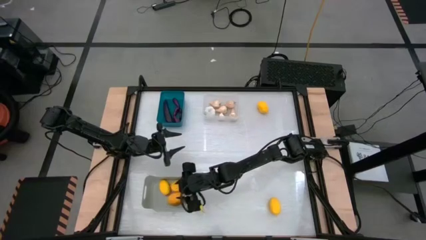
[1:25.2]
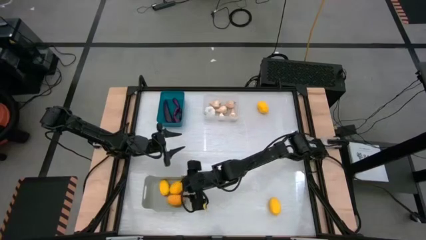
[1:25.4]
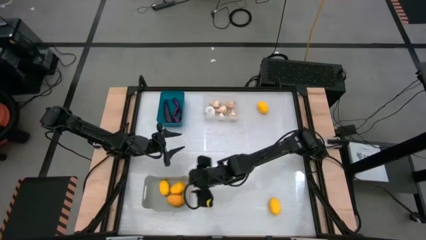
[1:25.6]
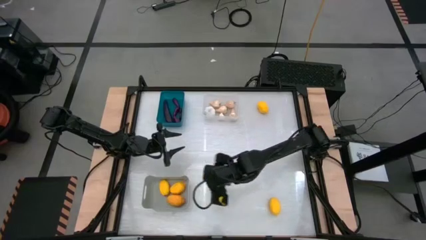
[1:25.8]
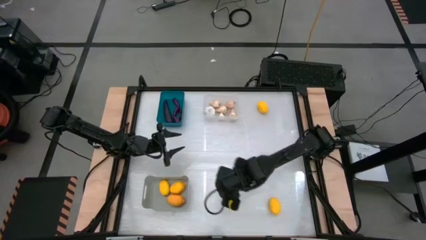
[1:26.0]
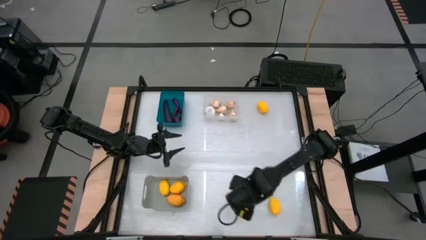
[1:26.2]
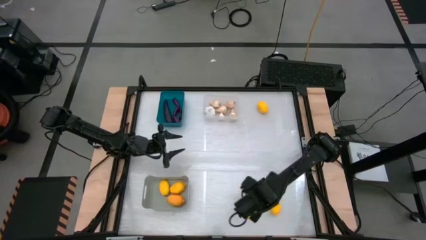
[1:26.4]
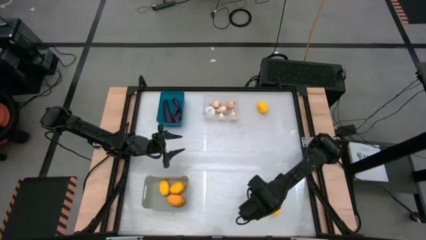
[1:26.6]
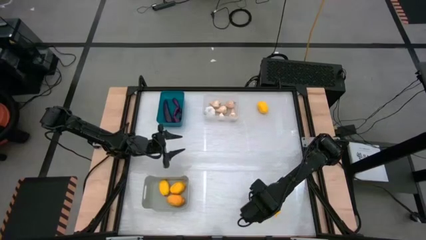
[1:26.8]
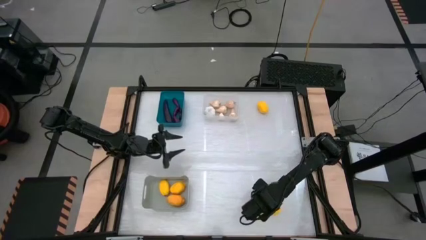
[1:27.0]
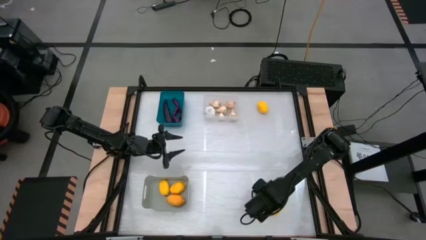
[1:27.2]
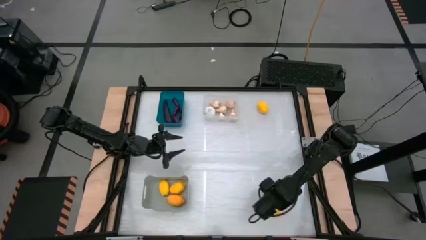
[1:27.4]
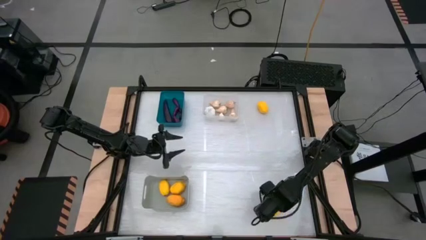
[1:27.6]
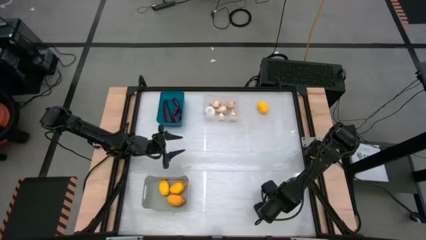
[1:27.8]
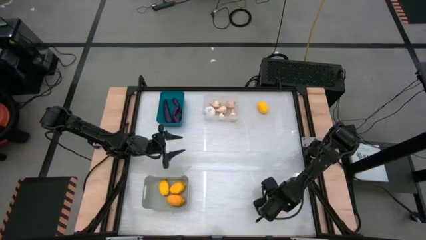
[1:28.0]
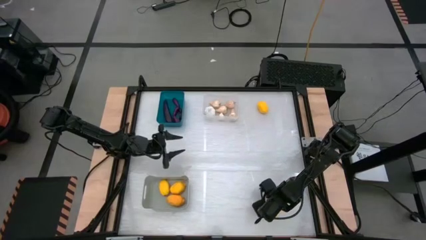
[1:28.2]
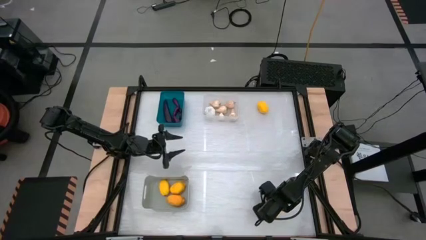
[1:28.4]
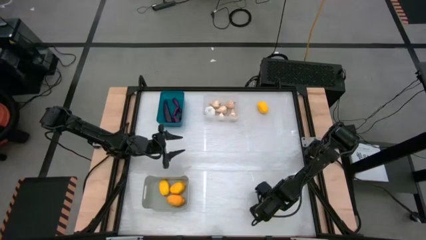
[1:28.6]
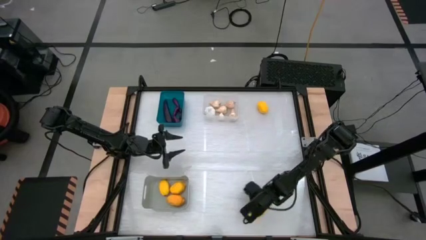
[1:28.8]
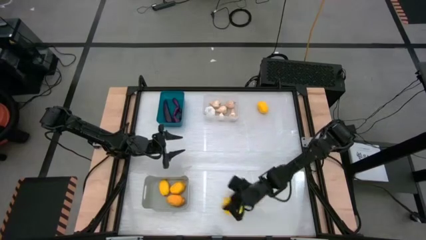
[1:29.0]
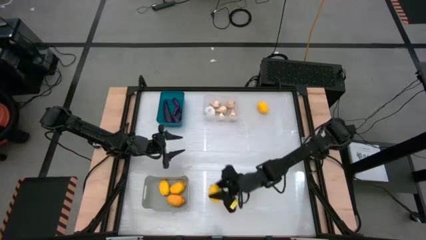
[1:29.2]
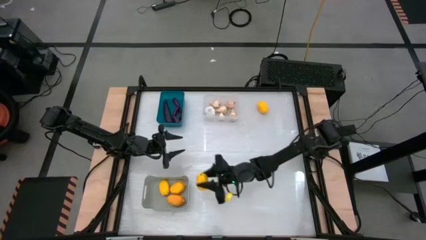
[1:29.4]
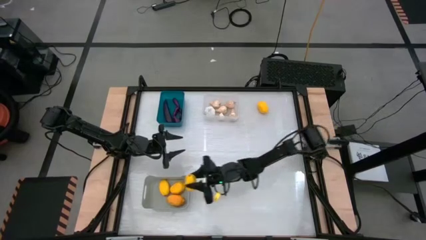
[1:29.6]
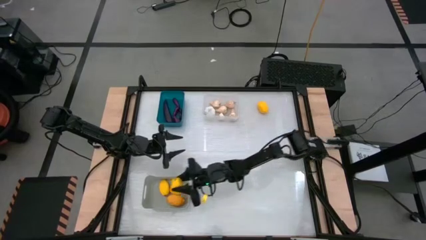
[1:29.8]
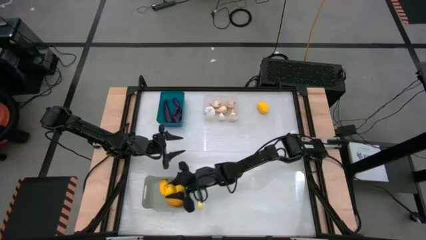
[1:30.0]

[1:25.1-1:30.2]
Task: Sort produce into baskets
Put the lemon into the gray bin

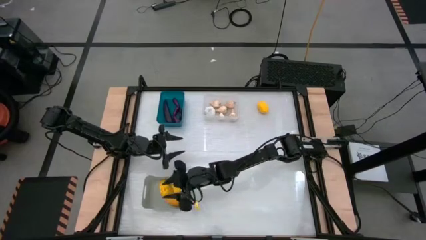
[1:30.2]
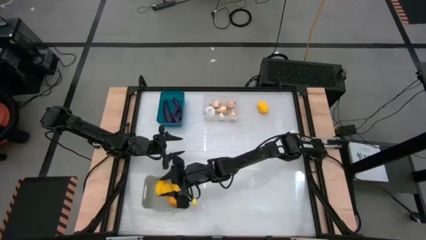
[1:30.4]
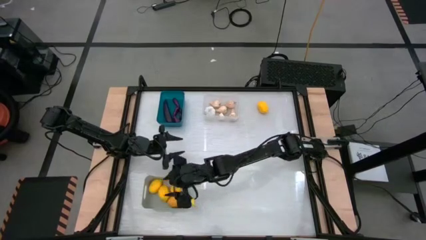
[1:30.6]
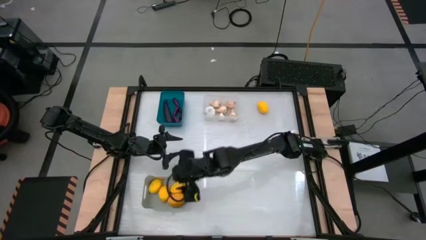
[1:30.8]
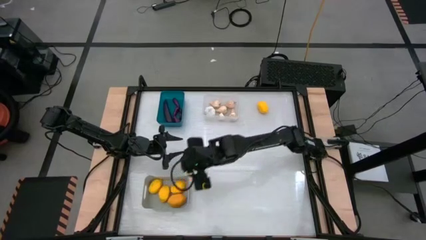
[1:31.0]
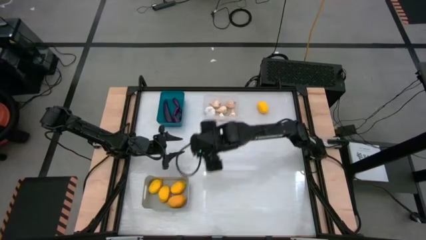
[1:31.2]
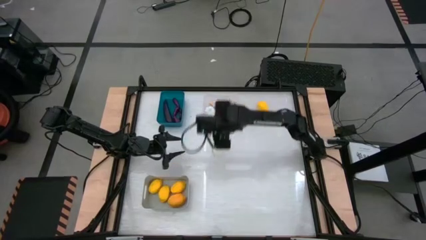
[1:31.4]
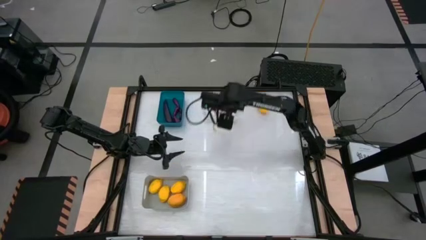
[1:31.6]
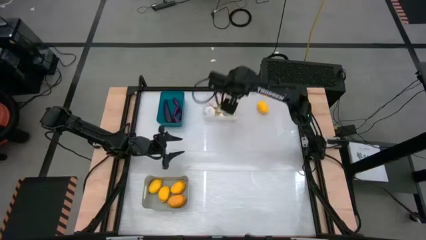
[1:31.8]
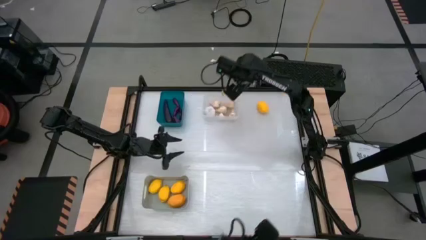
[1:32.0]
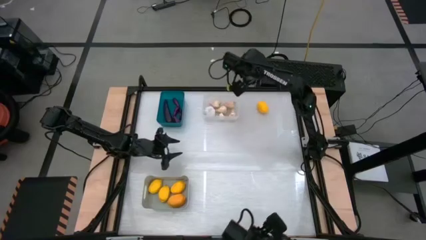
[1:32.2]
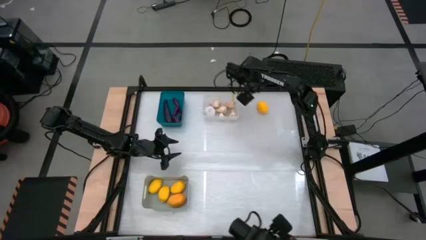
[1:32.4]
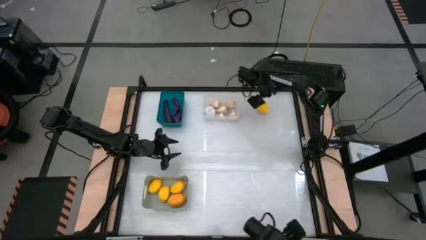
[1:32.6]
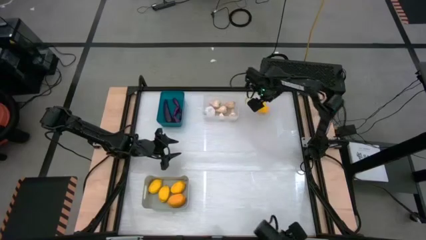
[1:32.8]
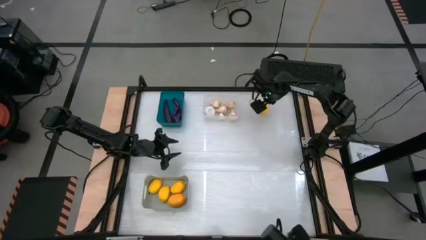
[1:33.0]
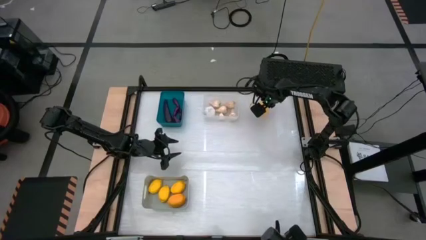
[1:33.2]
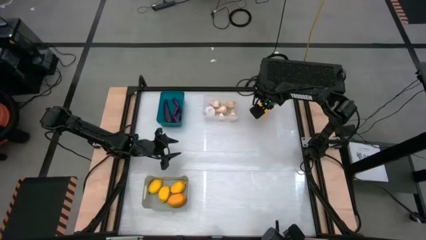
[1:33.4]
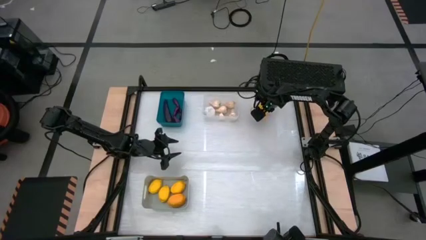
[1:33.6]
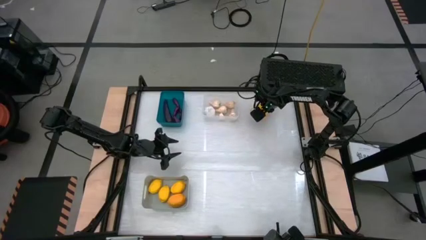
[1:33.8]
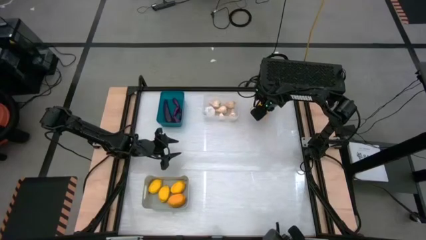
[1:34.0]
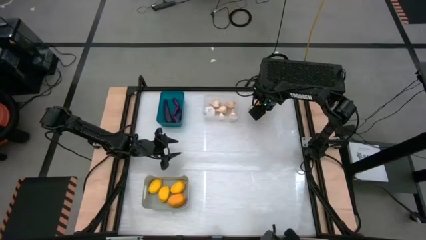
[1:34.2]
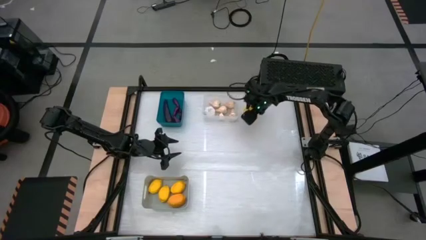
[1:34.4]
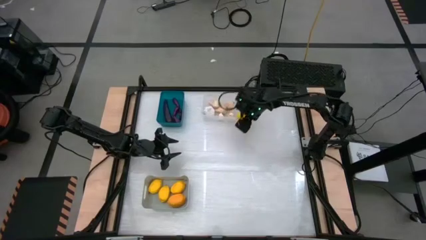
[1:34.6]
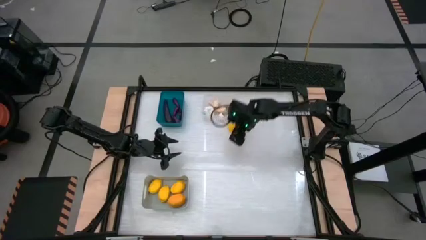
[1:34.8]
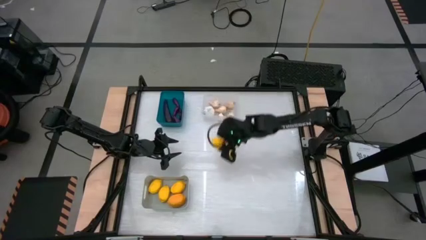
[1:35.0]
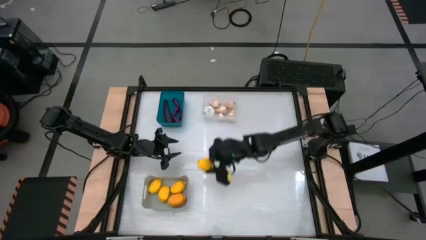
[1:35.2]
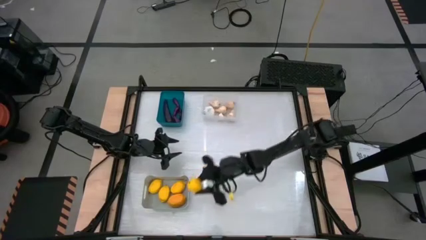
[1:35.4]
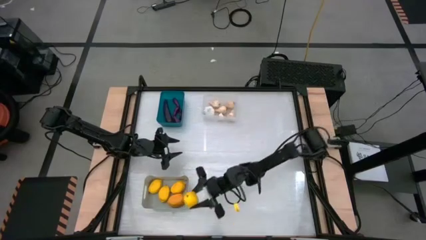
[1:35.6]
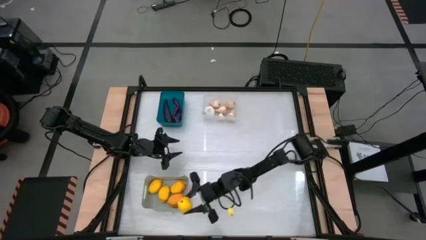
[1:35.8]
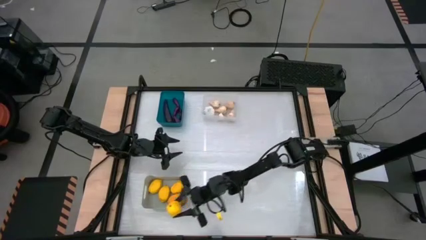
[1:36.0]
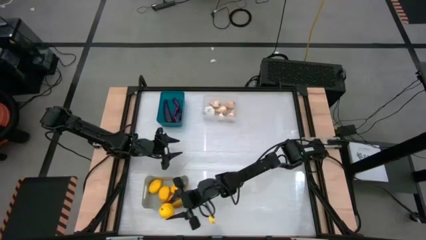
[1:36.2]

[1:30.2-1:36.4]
Put the lemon into the gray bin

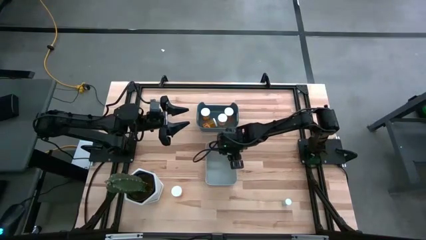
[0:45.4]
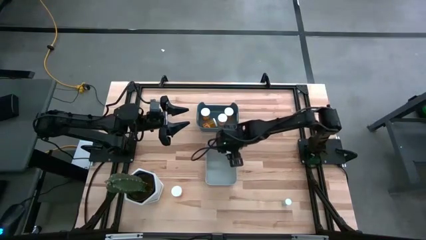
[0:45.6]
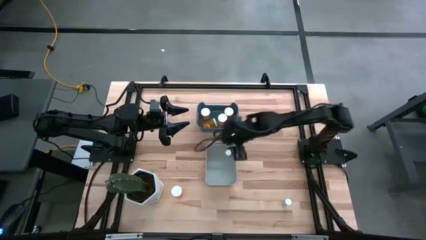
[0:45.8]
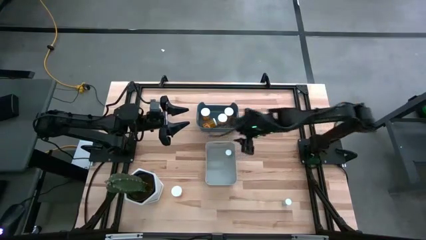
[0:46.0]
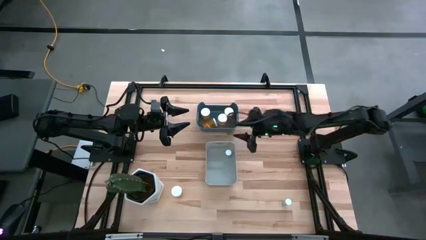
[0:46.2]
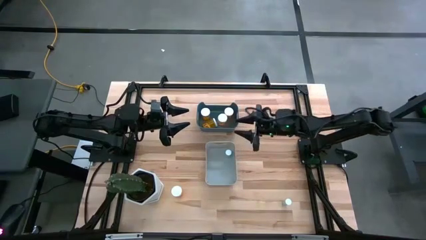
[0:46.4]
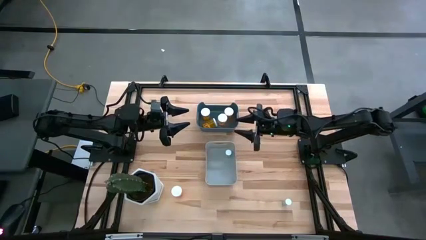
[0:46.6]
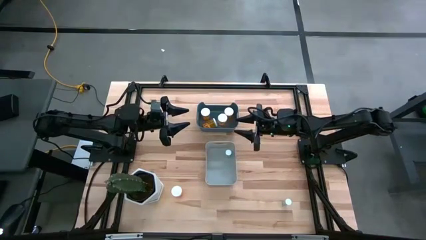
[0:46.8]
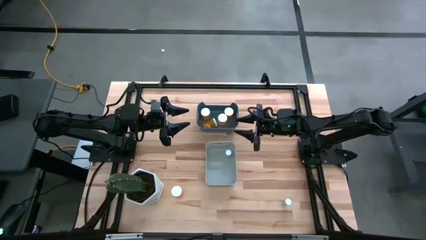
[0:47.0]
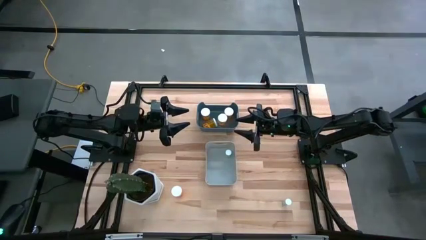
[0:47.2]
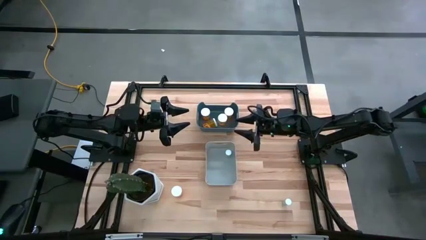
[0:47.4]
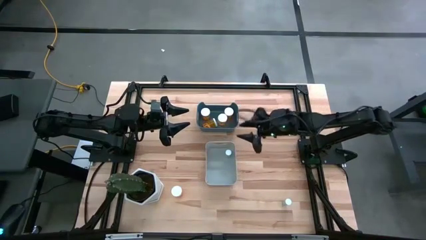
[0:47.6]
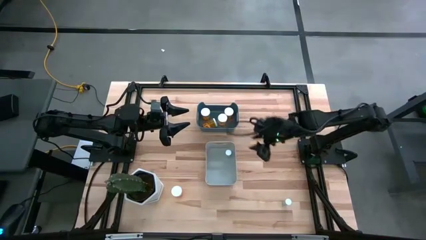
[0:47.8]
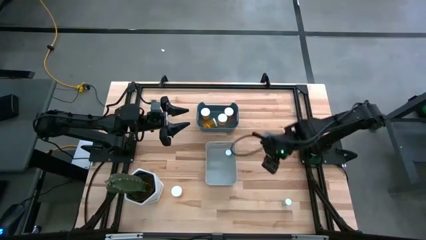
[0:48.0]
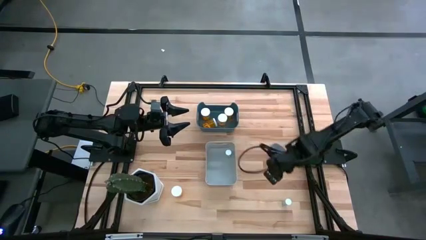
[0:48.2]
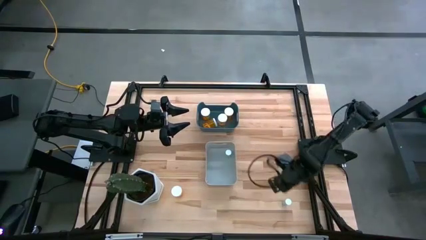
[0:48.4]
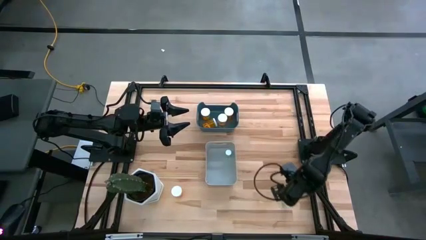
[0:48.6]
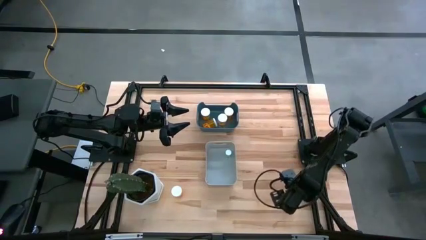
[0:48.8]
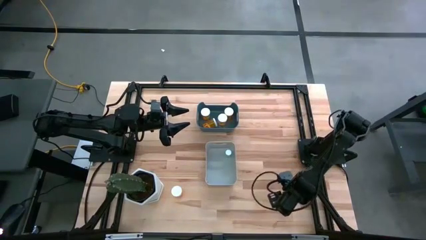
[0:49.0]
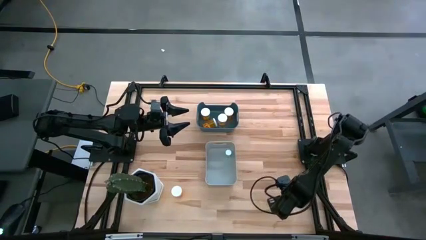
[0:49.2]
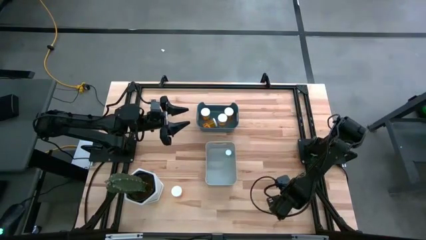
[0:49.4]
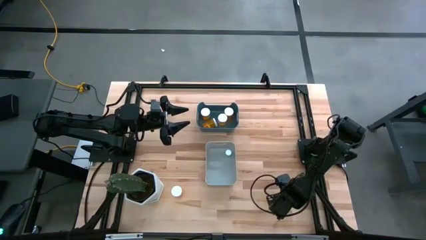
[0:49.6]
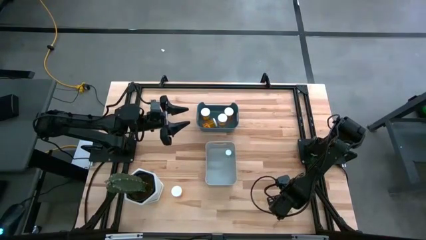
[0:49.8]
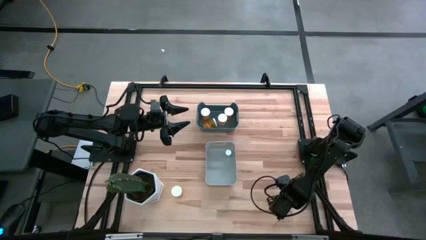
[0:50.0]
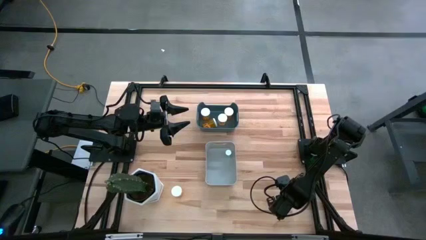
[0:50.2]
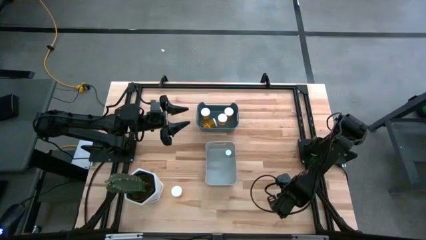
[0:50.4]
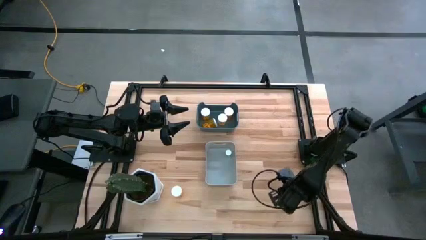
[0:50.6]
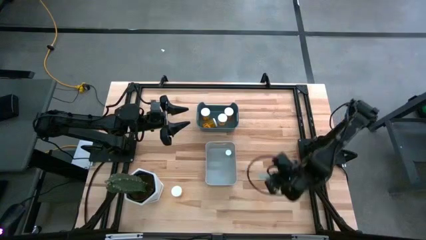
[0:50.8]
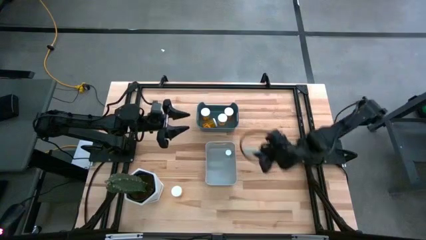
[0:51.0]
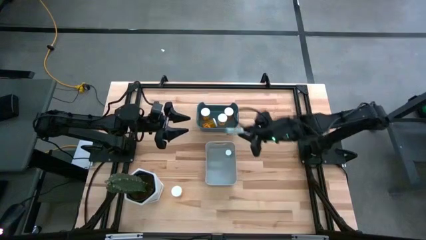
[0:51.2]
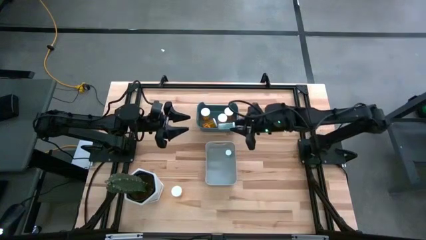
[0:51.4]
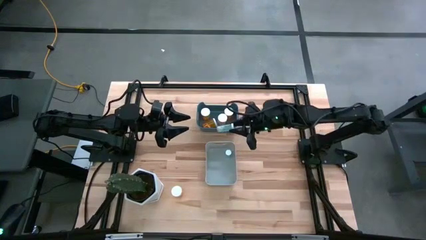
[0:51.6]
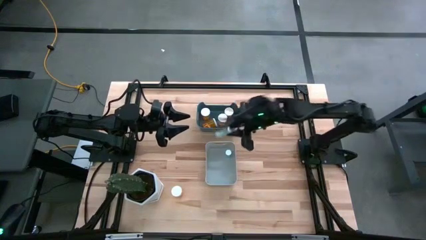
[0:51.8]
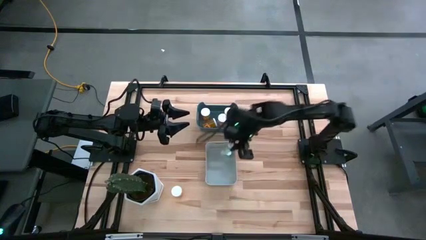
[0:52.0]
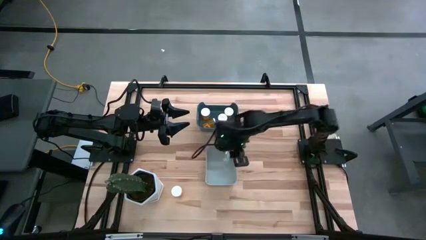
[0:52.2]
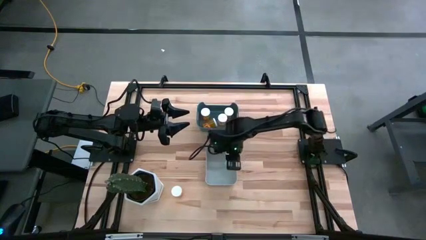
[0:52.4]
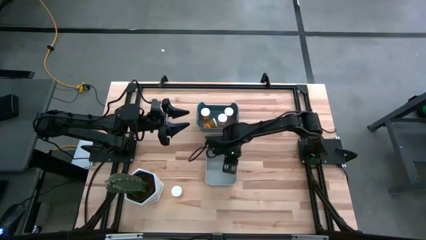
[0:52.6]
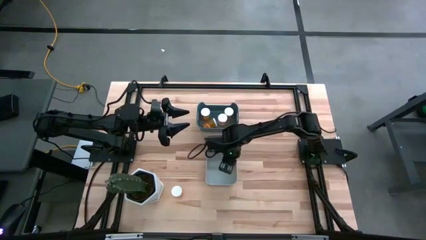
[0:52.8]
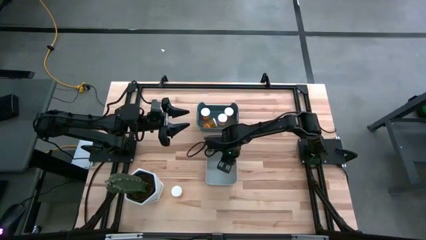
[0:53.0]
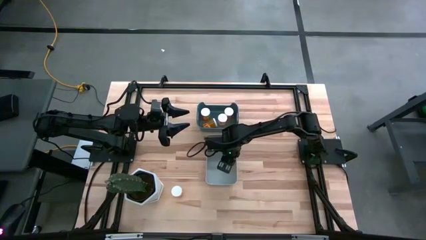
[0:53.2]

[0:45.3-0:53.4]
Task: Pick and place medicine bottles into bin by pill shape (circle, oval)
Put the blue tablet bottle into the gray bin
